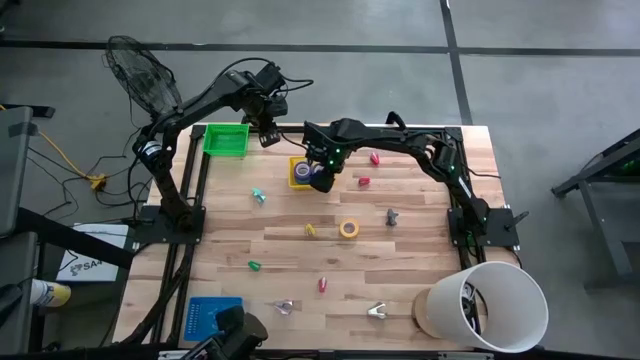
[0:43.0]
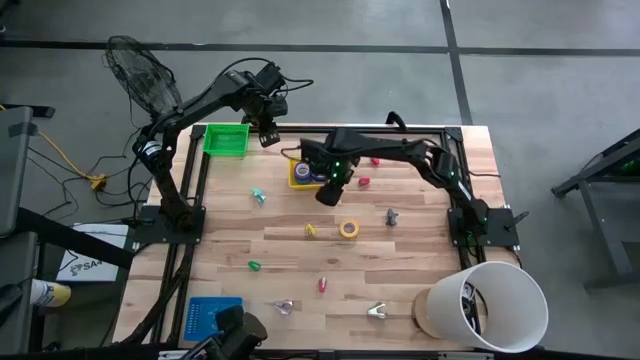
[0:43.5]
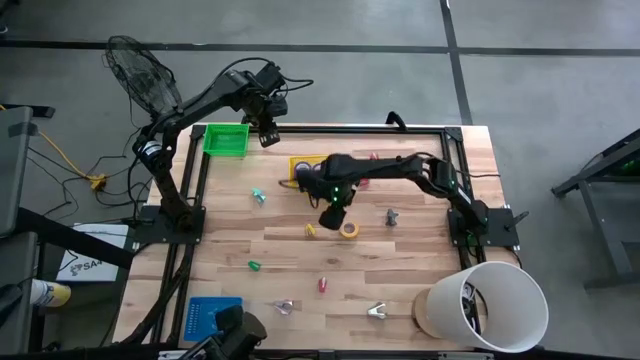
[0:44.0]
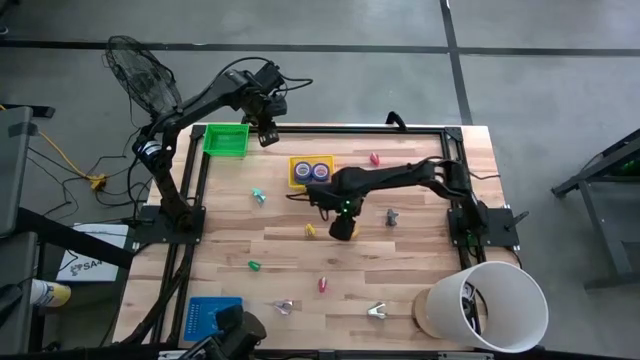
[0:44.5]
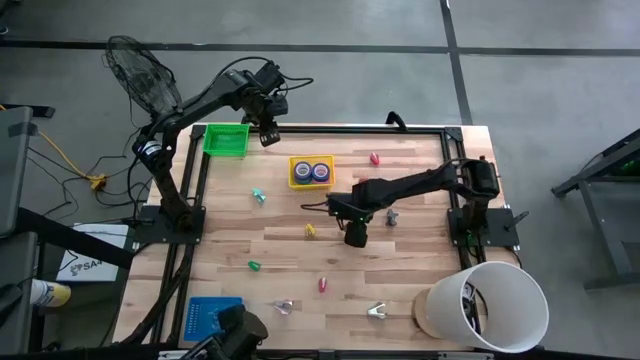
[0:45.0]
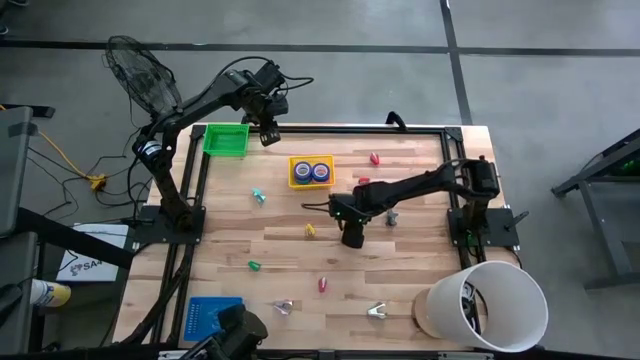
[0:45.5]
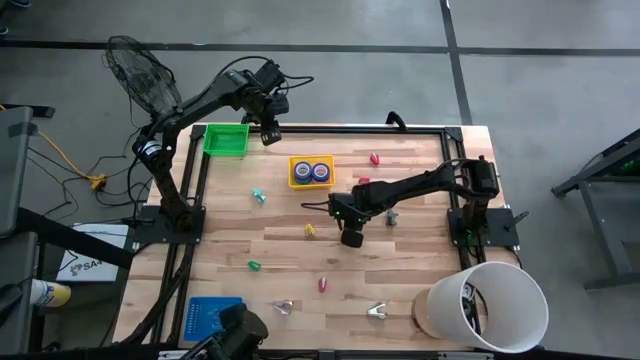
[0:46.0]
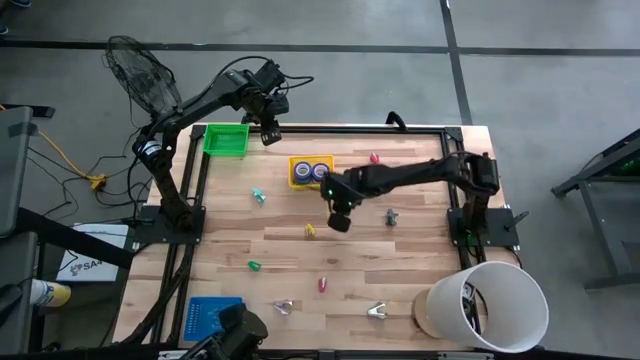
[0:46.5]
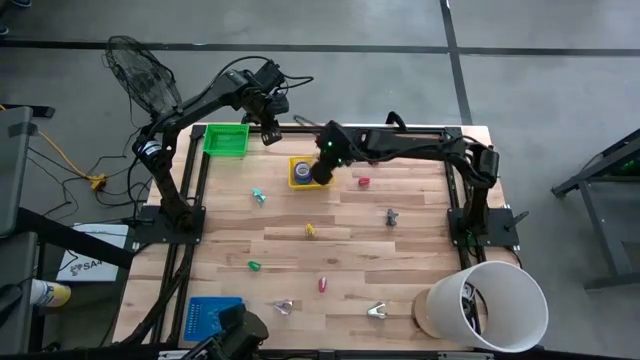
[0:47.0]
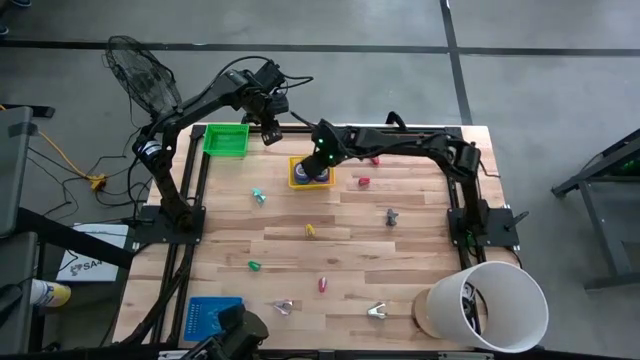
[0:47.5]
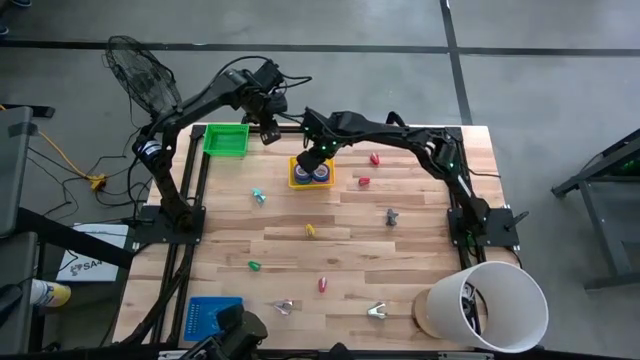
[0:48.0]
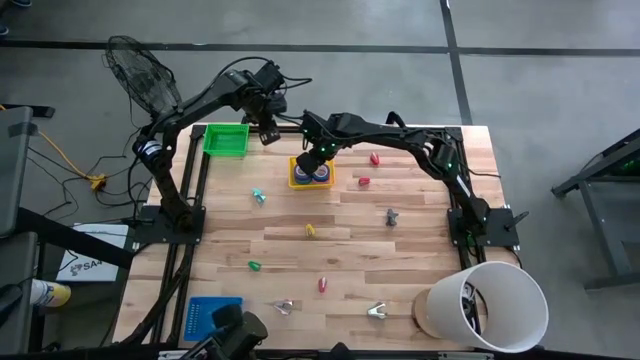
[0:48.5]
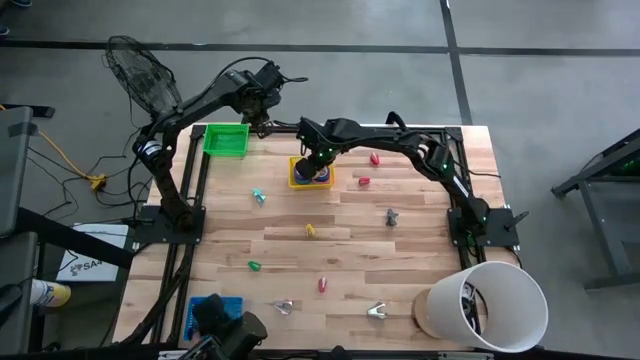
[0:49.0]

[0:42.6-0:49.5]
Task: Pick and place Stapler, Stapler remover, tape
Put the yellow tape into the yellow bin

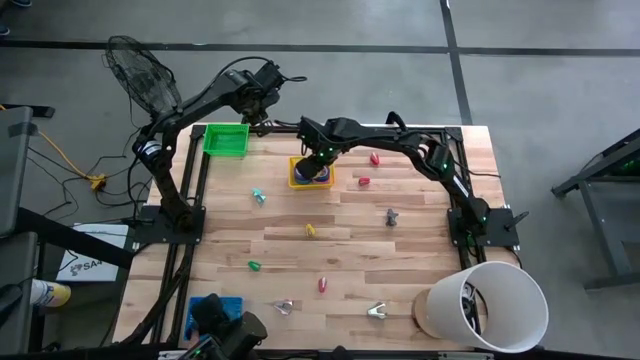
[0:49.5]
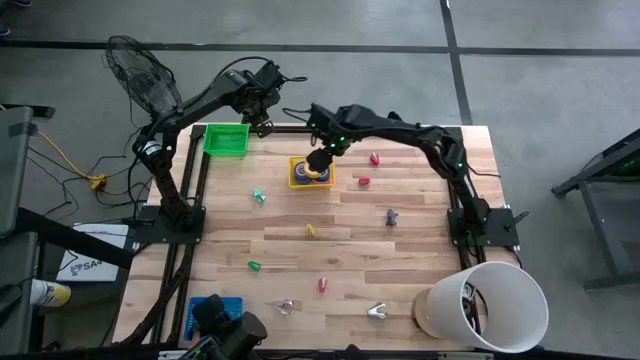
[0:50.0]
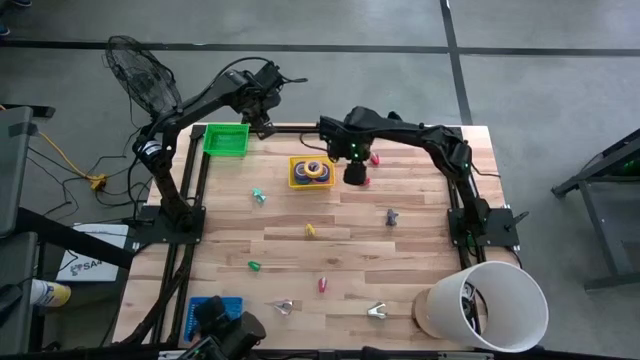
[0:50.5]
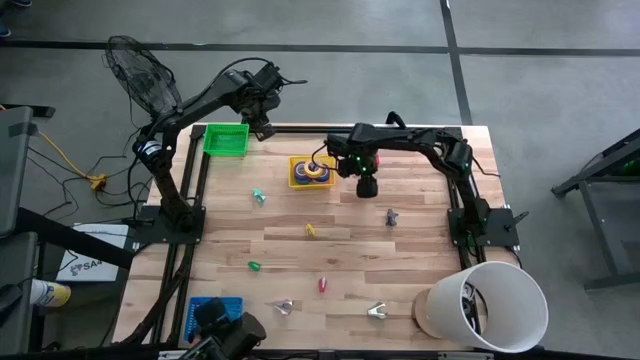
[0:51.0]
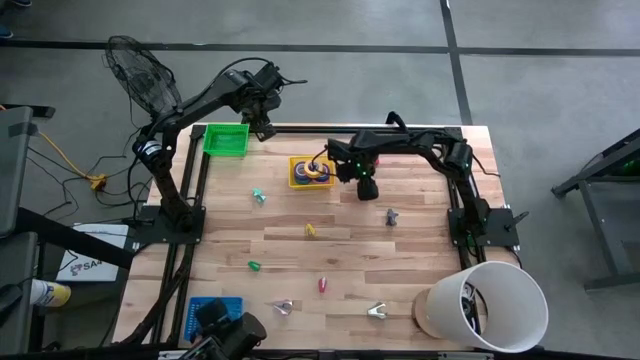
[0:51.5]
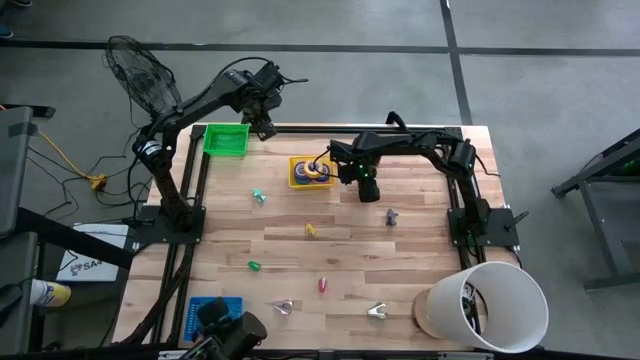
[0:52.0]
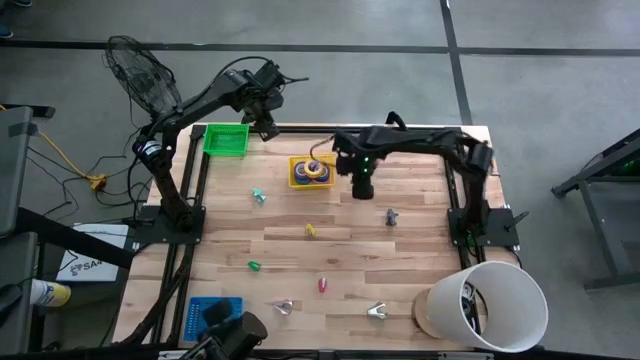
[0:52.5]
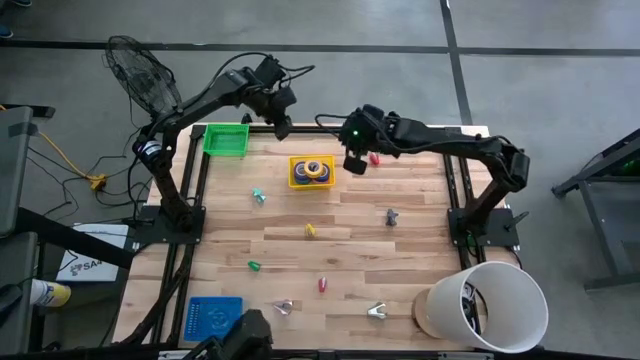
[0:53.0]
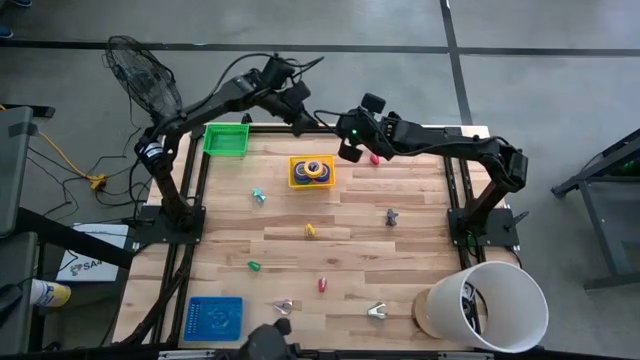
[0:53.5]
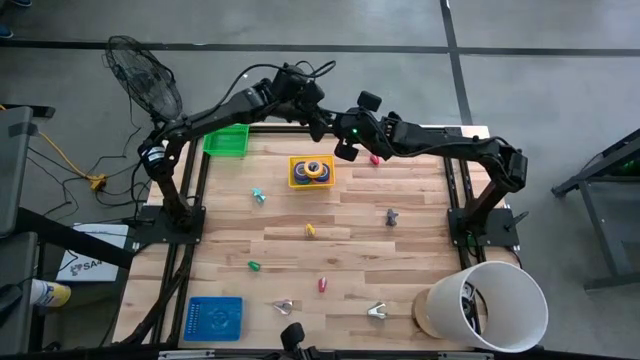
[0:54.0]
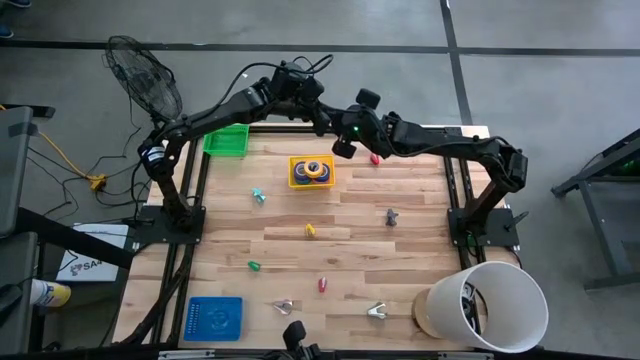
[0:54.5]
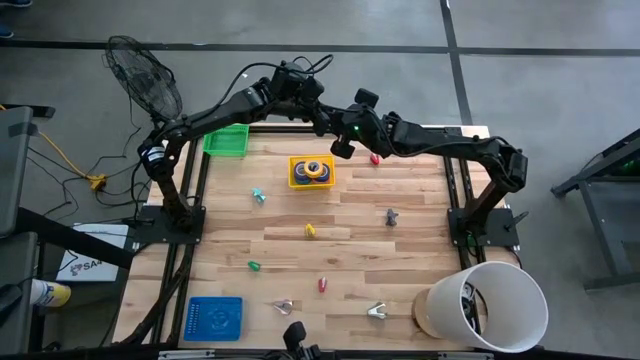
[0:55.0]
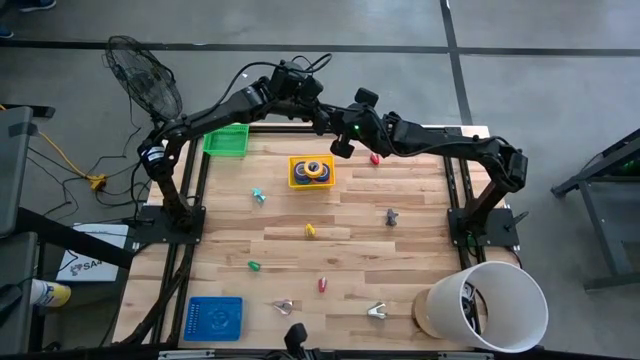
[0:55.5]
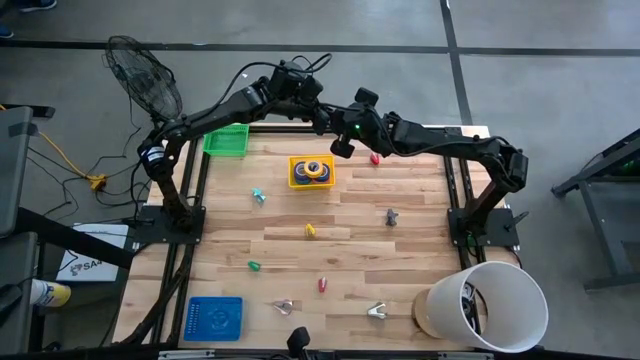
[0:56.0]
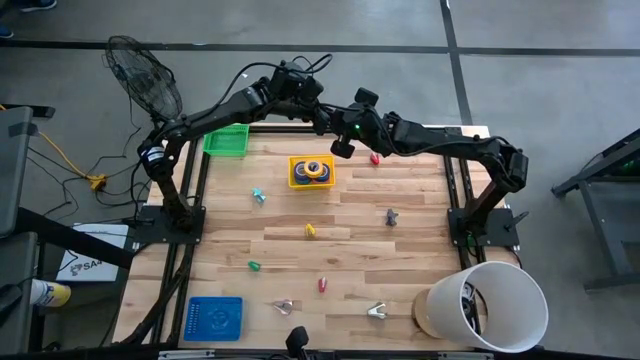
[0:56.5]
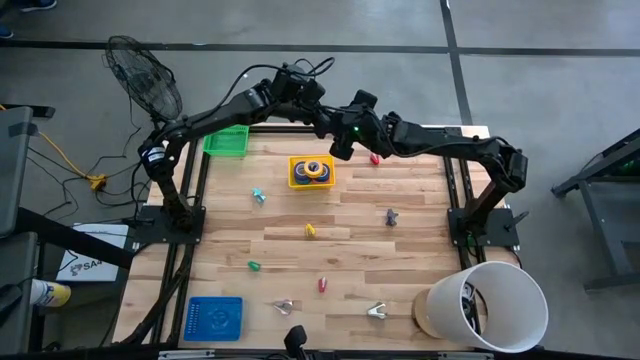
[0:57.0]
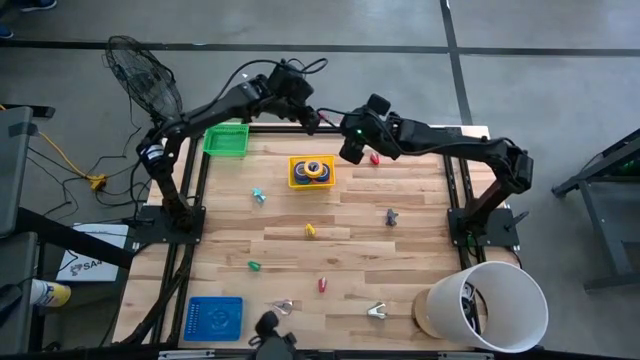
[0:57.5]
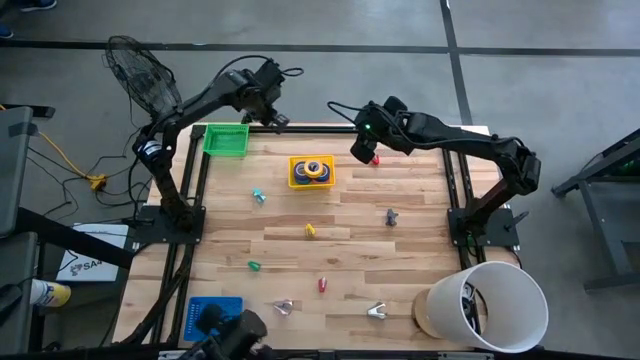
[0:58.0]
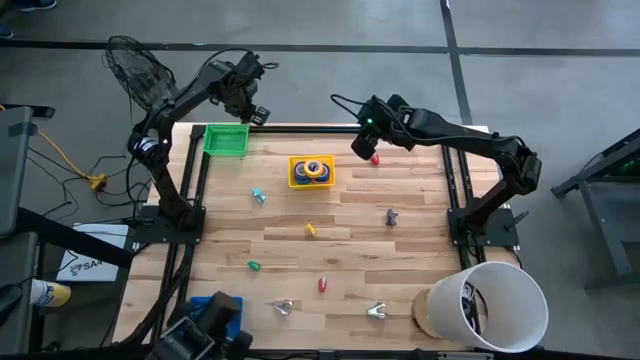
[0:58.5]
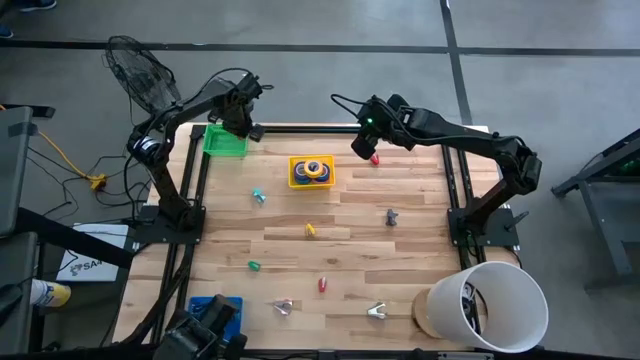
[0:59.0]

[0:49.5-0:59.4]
Put the red stapler into the green bin

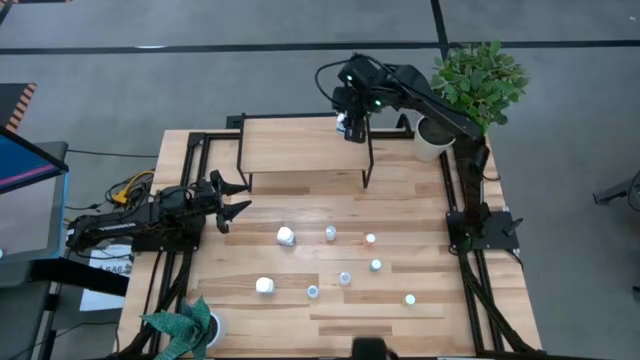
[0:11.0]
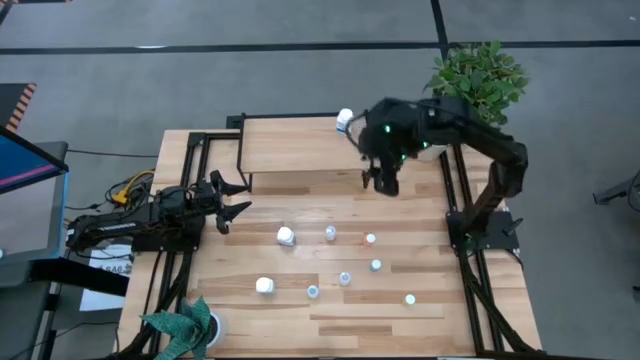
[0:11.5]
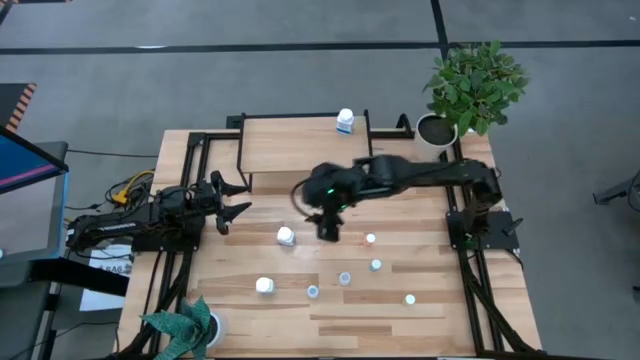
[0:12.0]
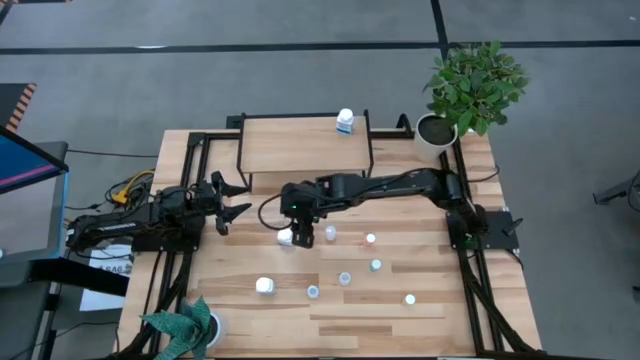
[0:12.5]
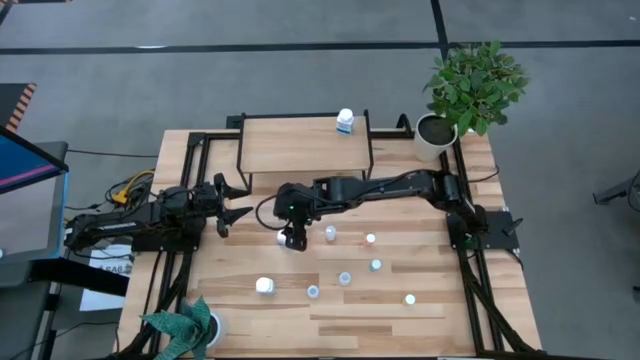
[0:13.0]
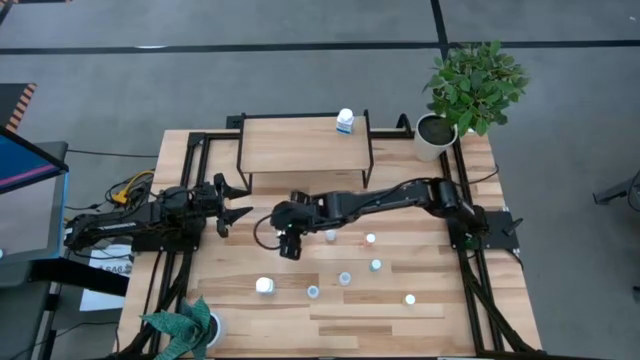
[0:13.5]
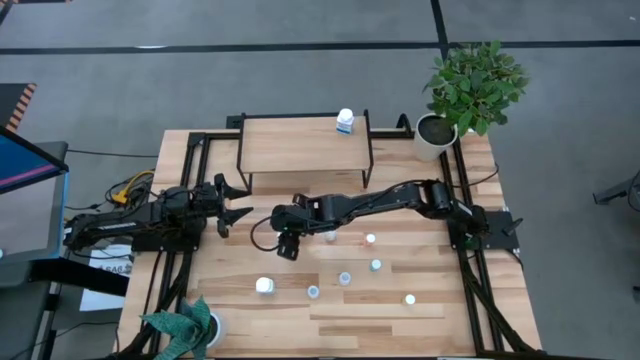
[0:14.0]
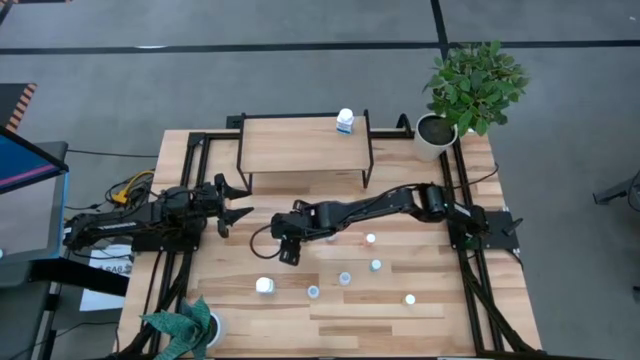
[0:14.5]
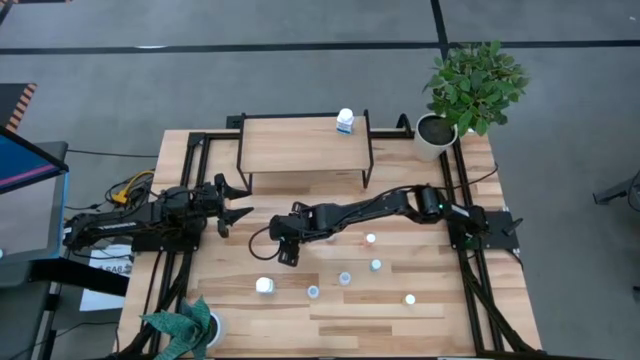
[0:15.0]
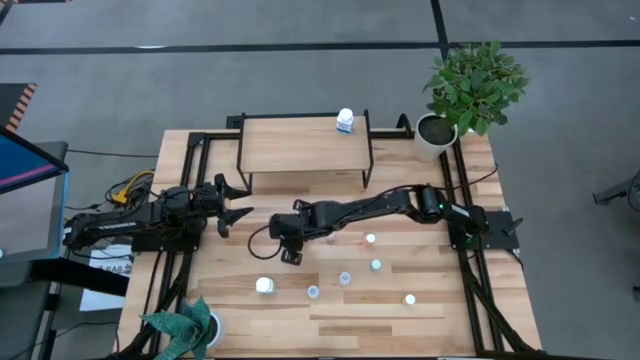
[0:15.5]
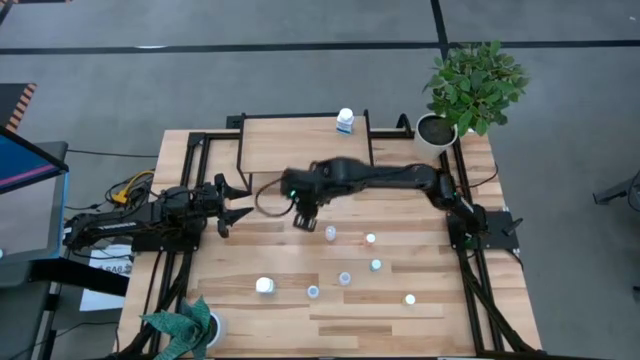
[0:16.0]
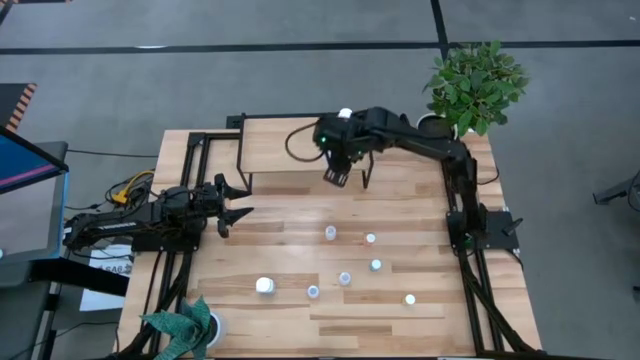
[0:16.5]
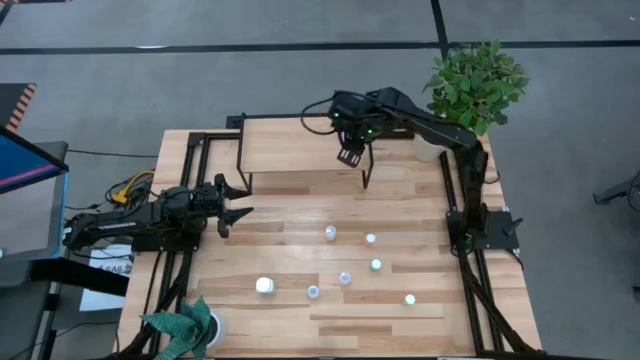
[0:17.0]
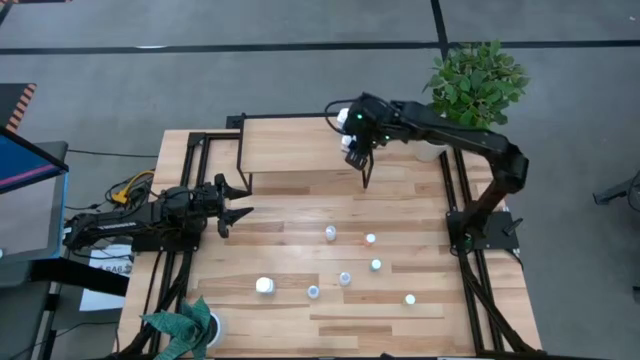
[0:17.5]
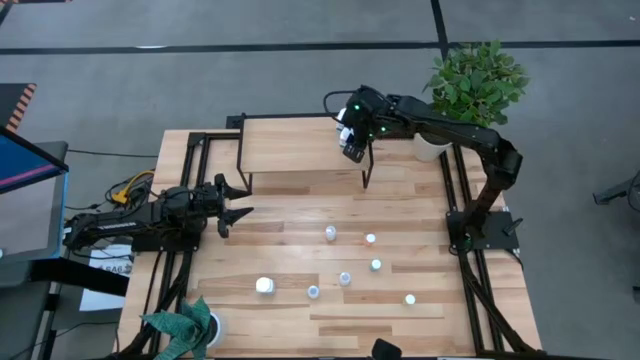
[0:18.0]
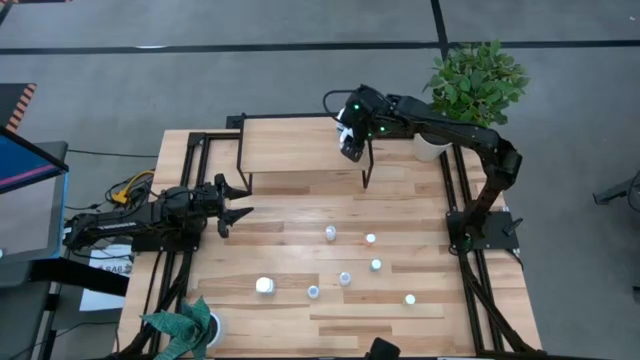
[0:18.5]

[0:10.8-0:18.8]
Task: Pick and place medicine bottles onto shelf by color
Put the top white pill bottle on the shelf aligned with the other white pill bottle
